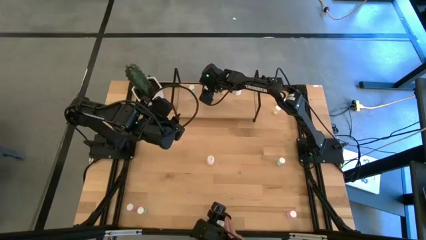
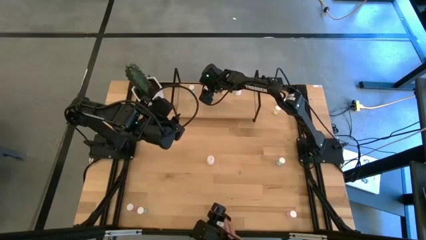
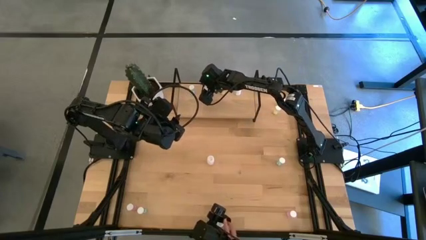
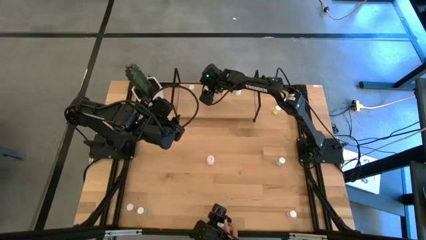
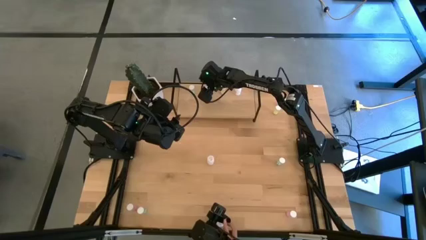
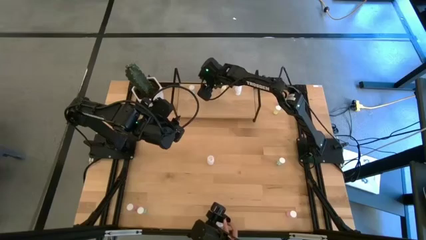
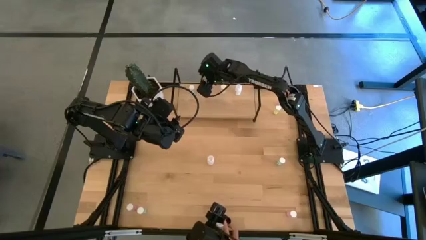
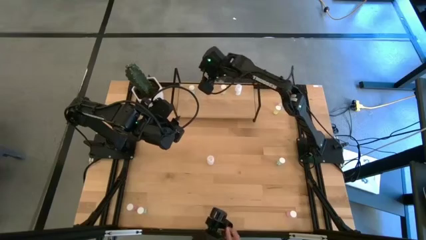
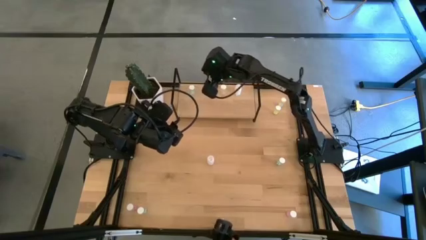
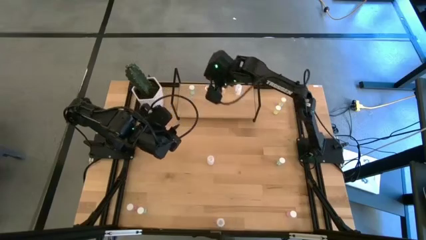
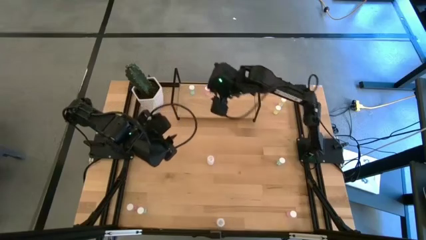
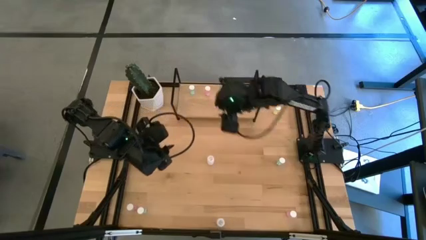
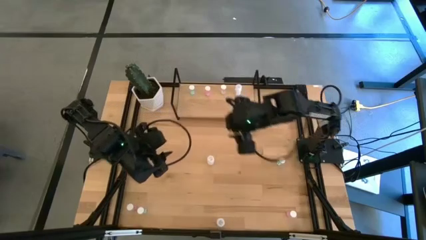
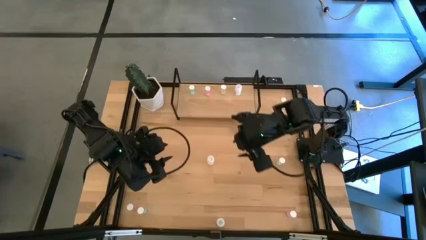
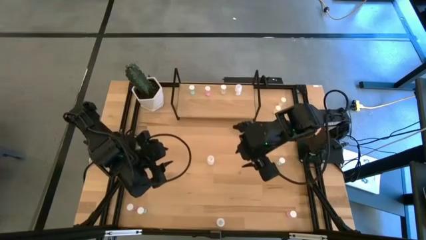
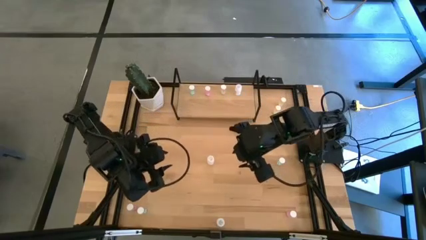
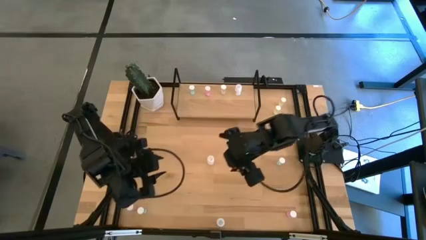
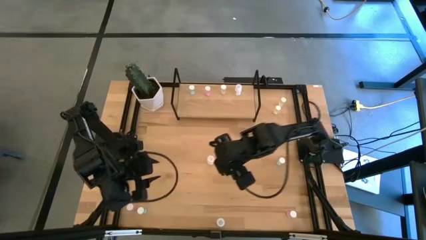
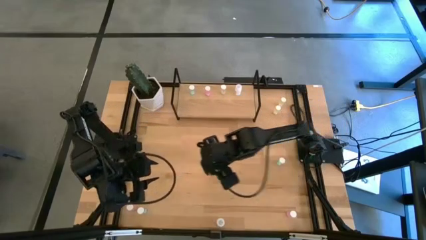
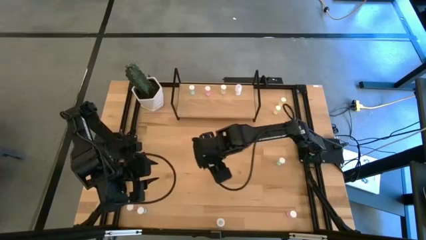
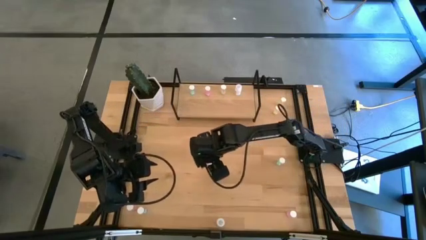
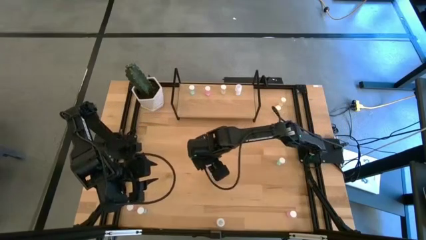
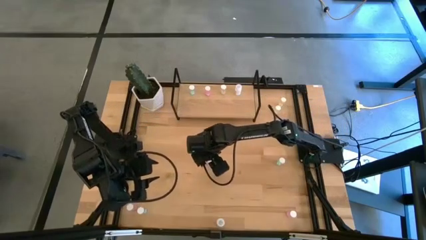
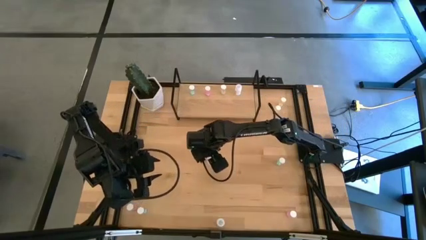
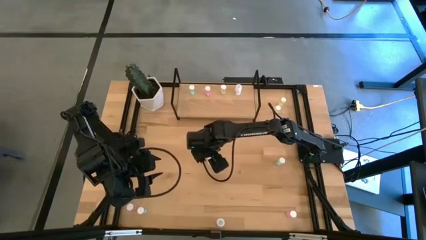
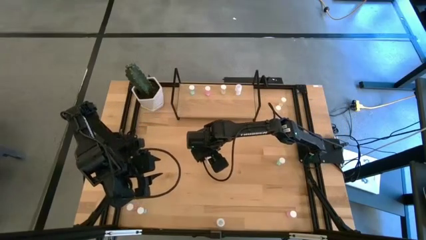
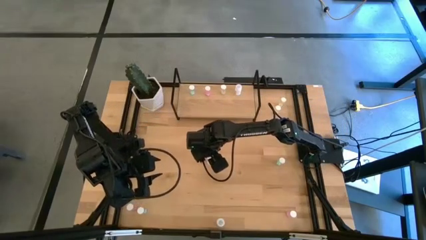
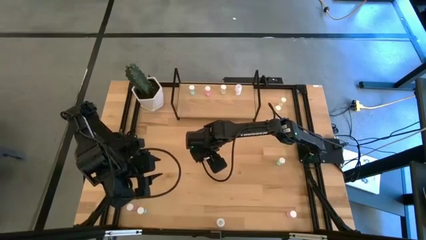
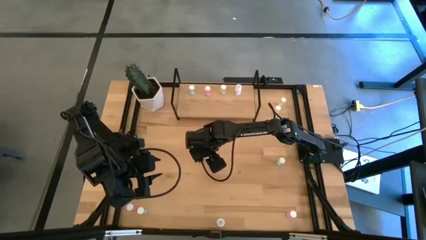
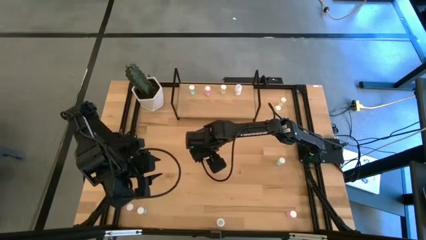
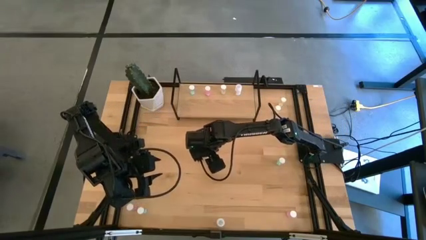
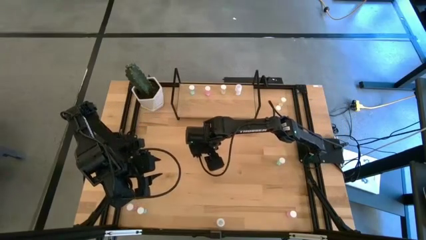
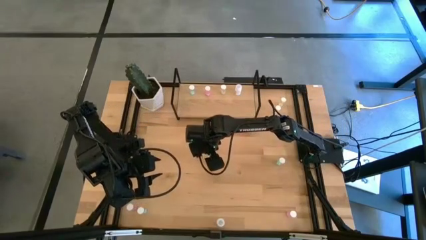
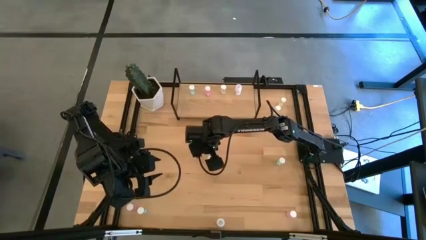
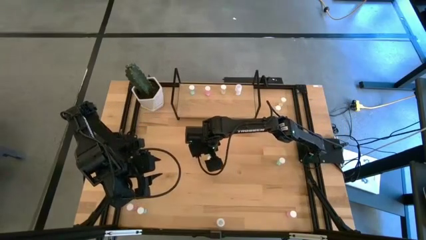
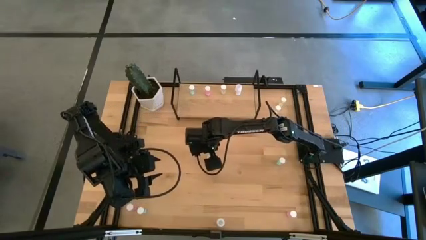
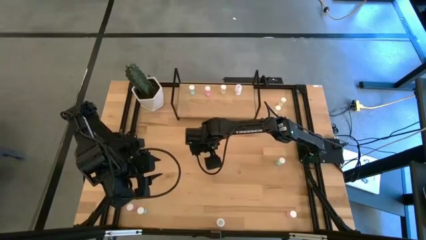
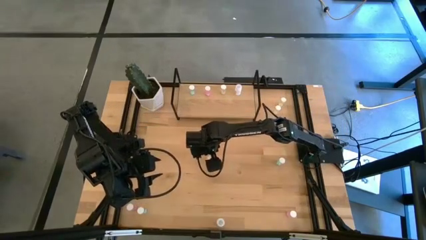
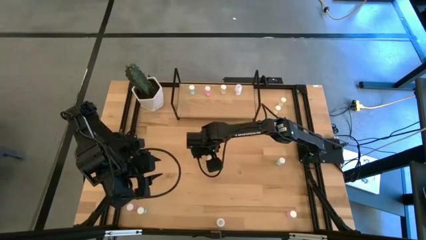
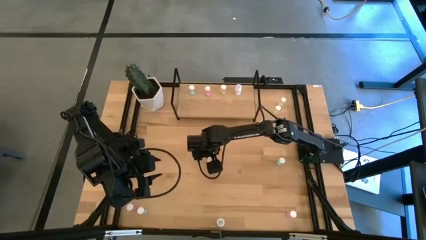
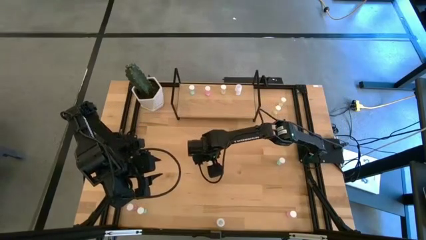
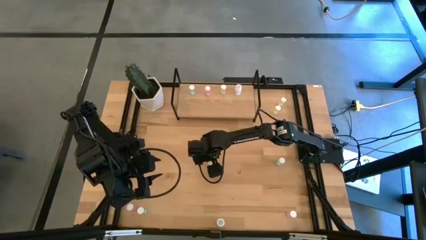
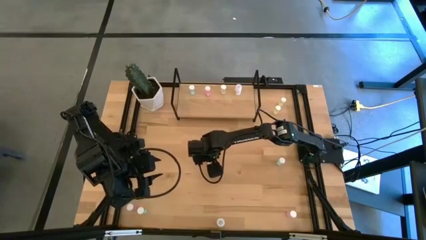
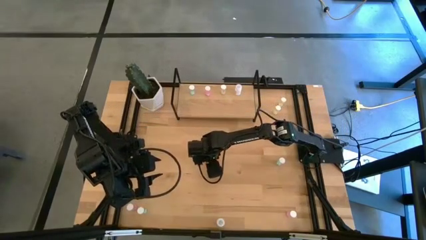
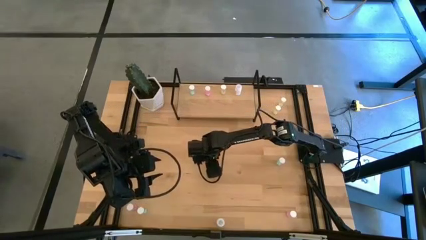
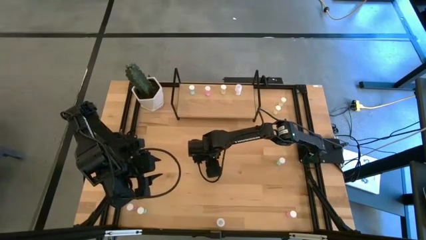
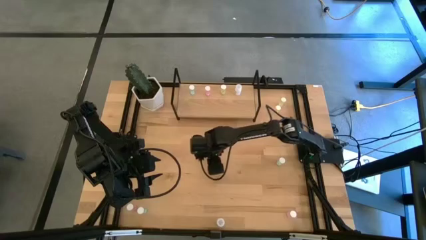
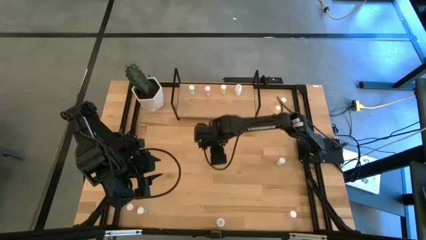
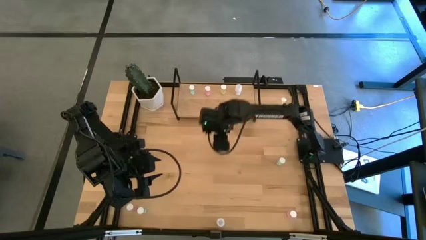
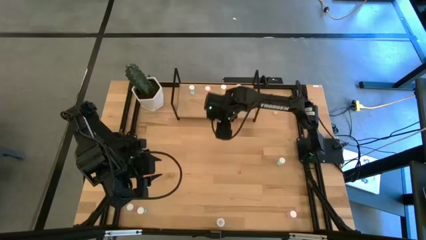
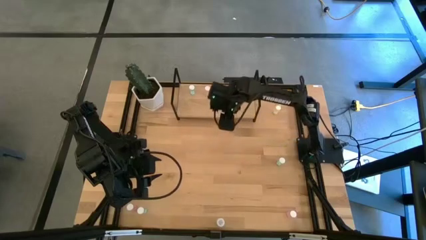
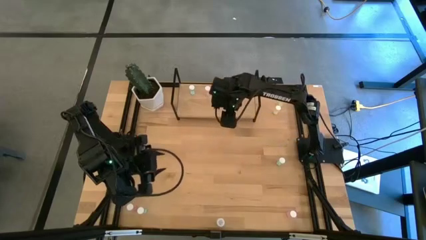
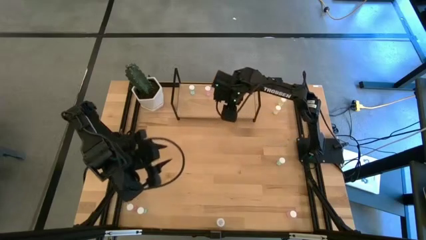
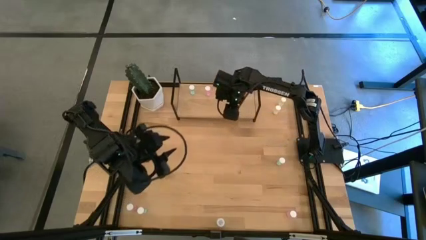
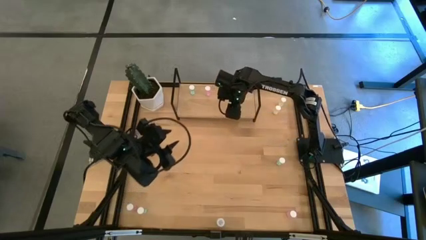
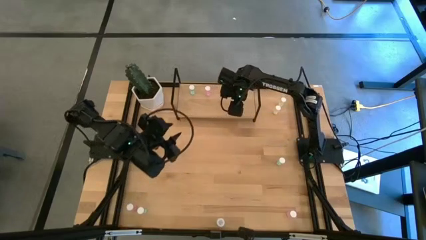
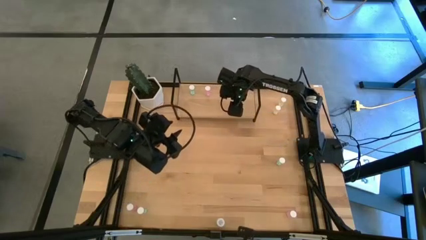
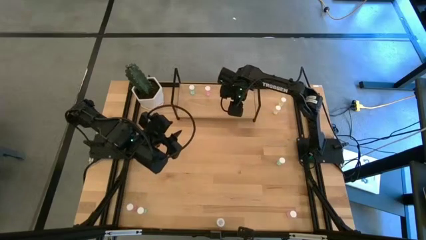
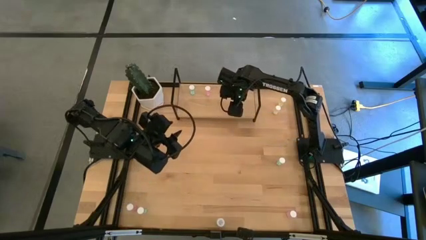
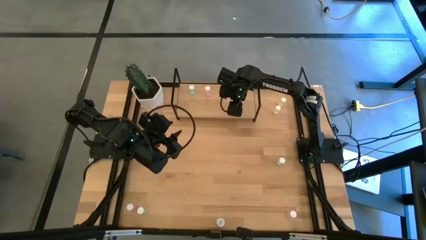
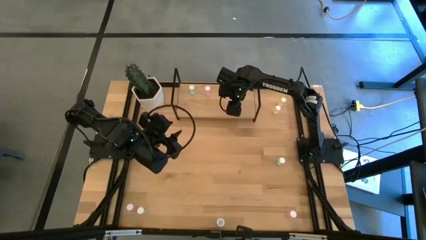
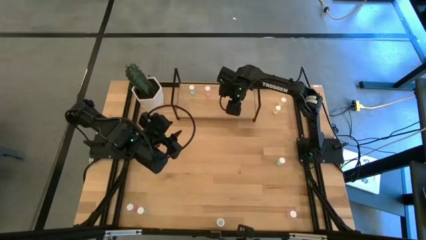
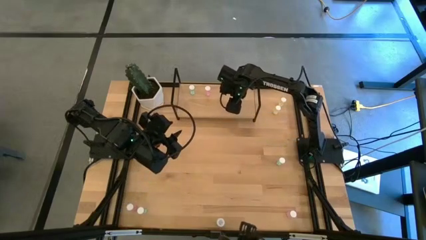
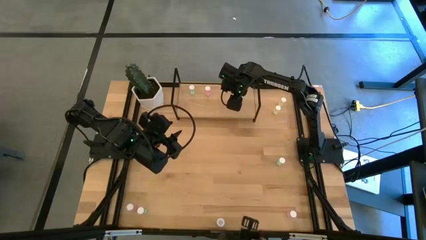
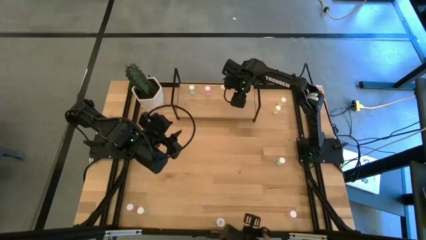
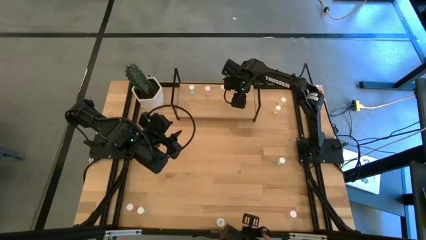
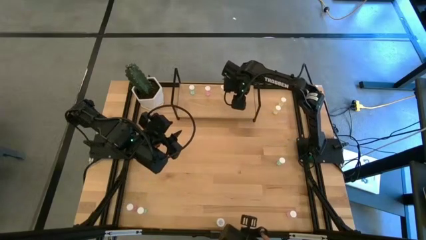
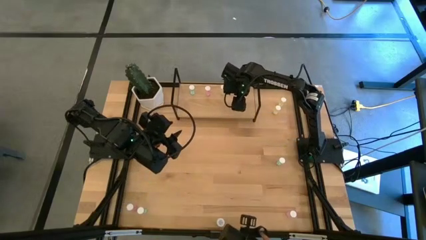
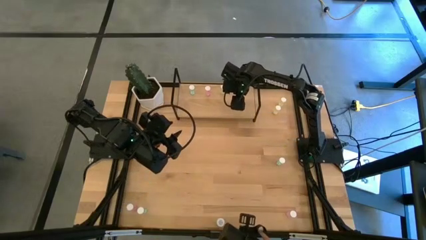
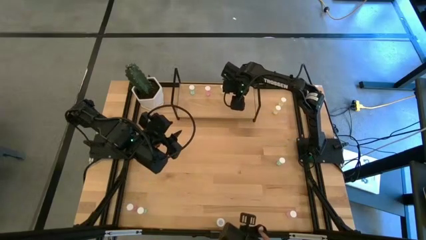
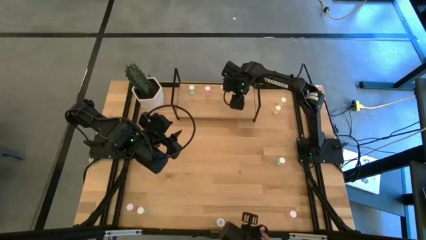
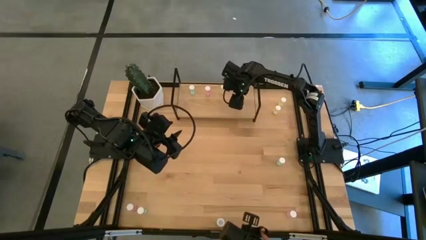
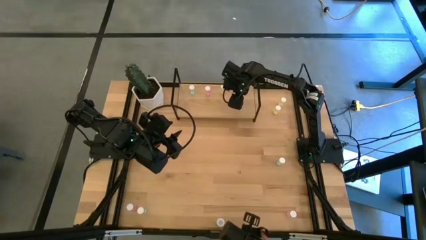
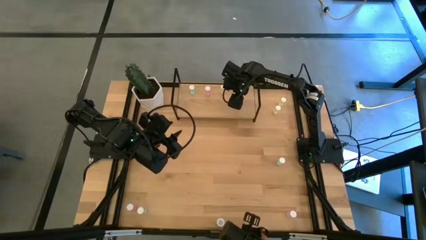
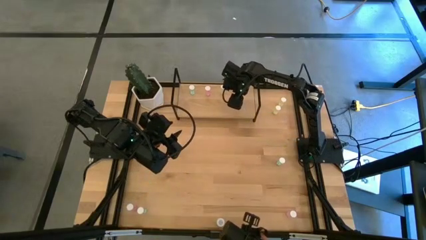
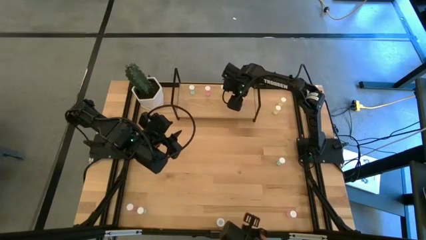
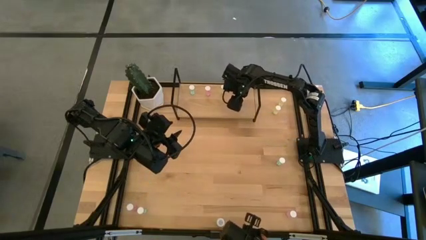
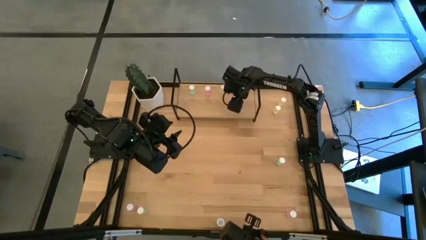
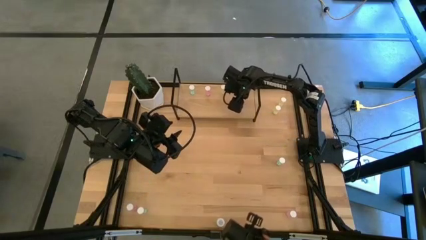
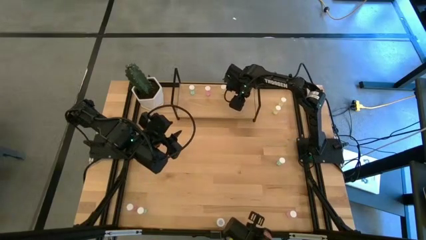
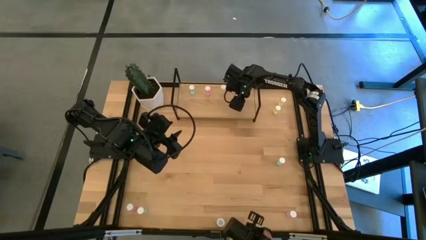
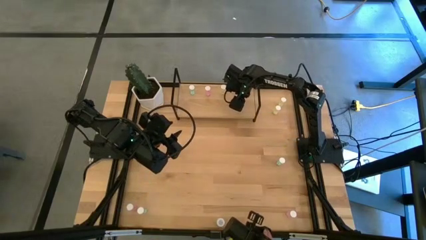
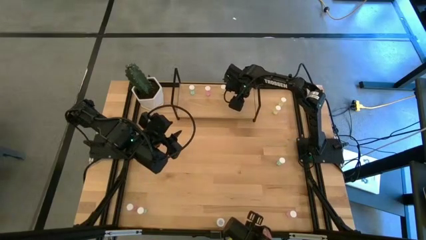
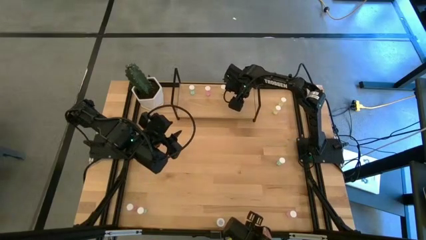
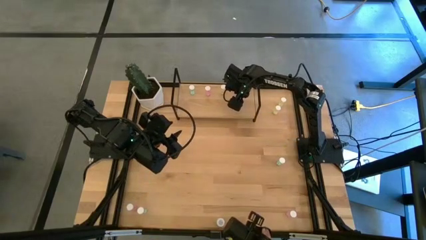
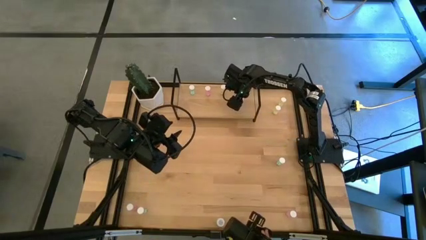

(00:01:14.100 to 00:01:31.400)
Task: Pick and place medicine bottles onto shelf by color
Put the top white pill bottle on the shelf aligned with the other white pill bottle
